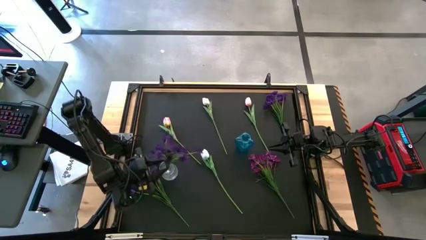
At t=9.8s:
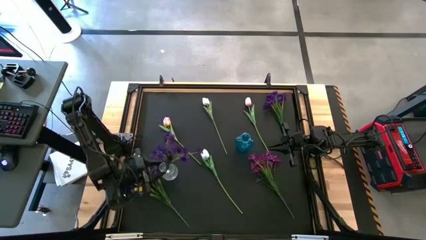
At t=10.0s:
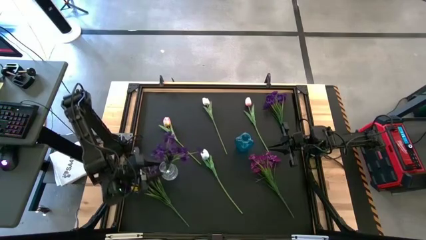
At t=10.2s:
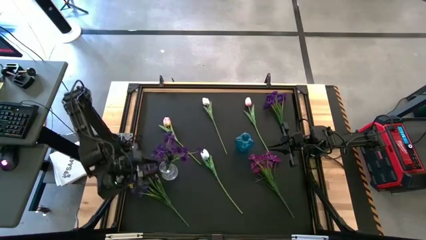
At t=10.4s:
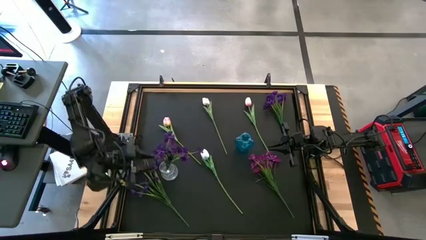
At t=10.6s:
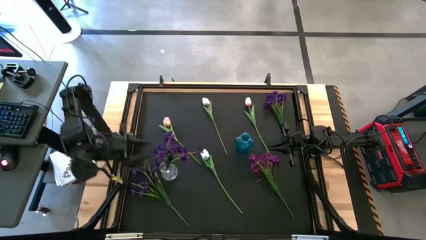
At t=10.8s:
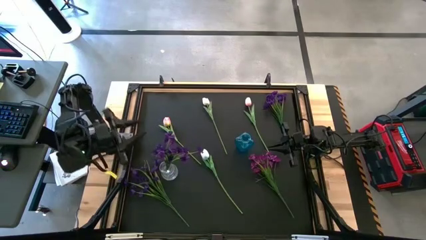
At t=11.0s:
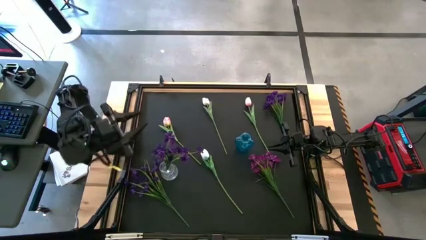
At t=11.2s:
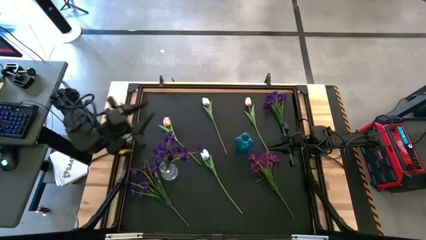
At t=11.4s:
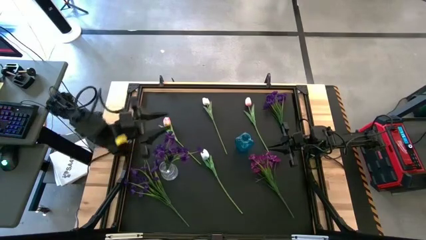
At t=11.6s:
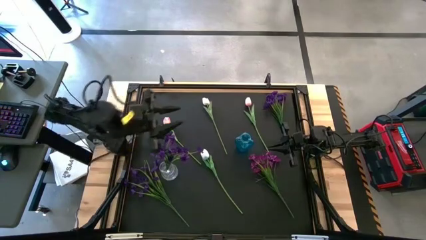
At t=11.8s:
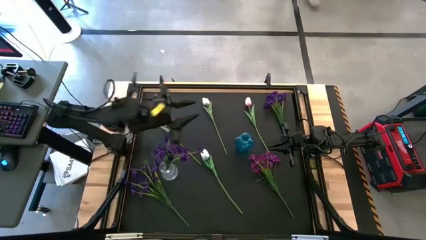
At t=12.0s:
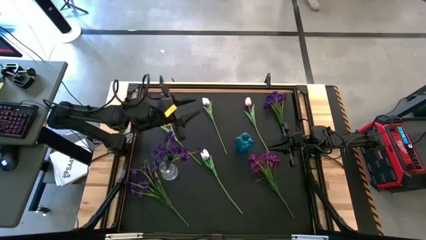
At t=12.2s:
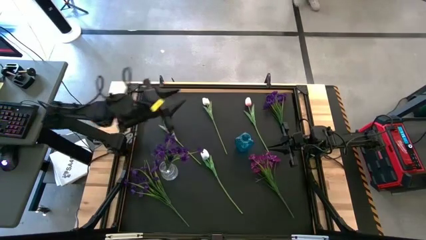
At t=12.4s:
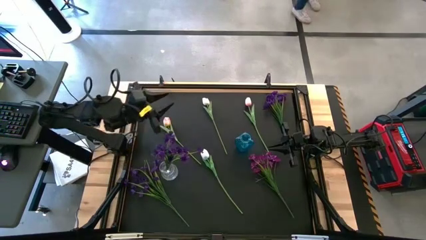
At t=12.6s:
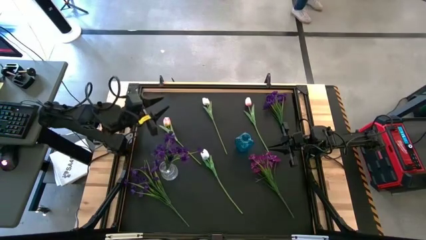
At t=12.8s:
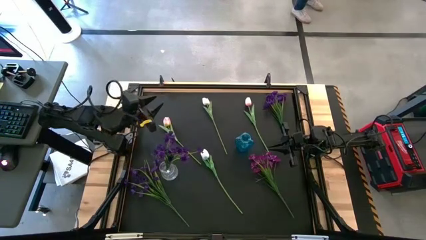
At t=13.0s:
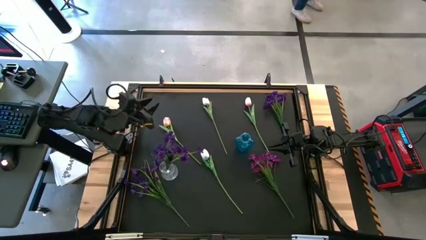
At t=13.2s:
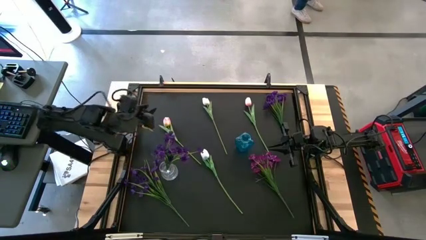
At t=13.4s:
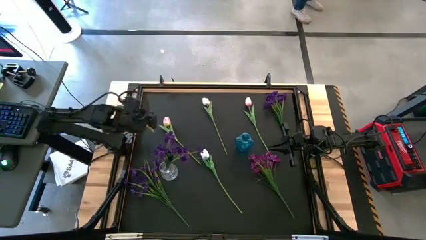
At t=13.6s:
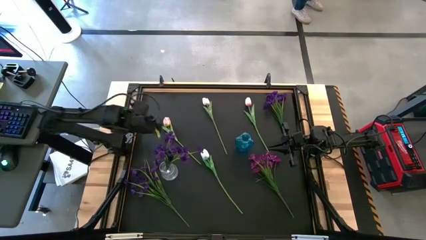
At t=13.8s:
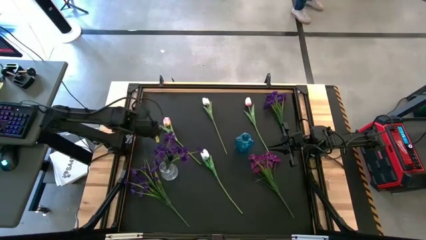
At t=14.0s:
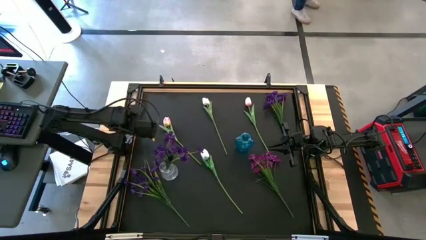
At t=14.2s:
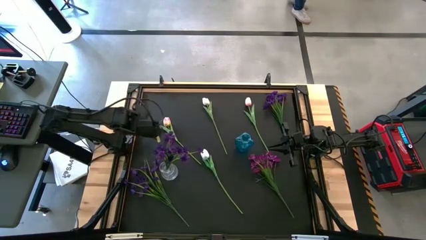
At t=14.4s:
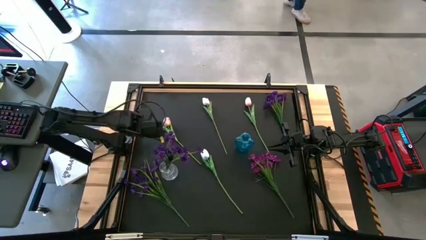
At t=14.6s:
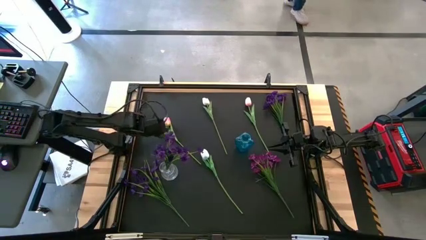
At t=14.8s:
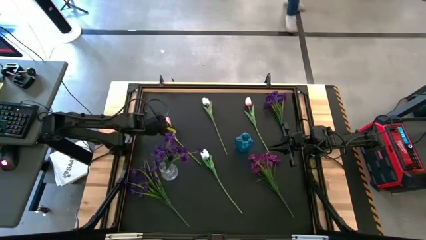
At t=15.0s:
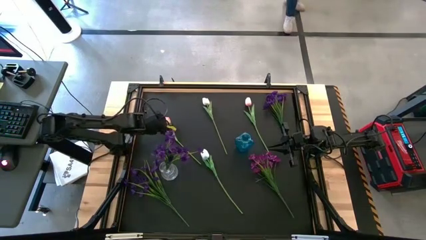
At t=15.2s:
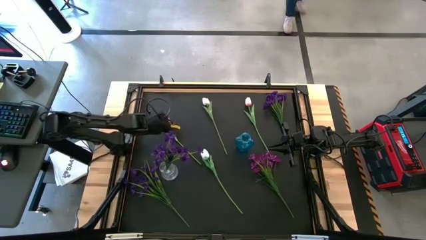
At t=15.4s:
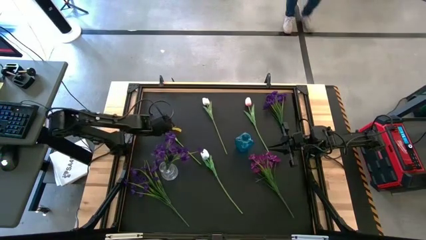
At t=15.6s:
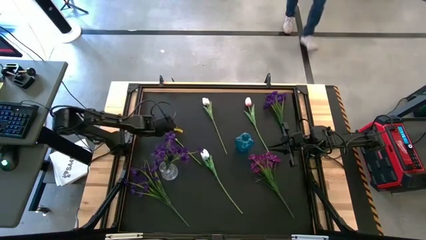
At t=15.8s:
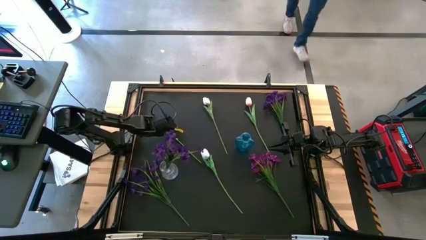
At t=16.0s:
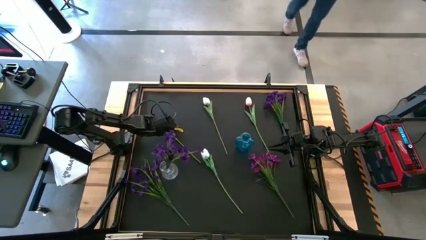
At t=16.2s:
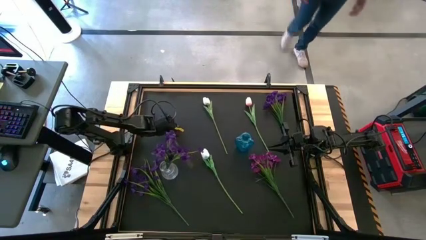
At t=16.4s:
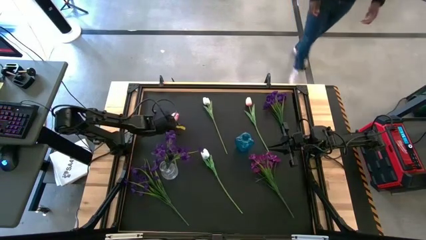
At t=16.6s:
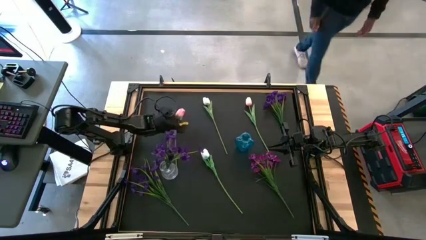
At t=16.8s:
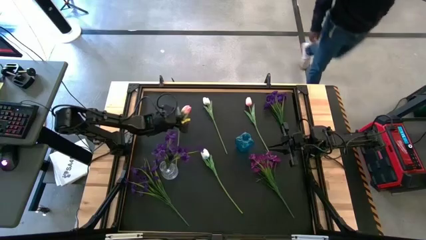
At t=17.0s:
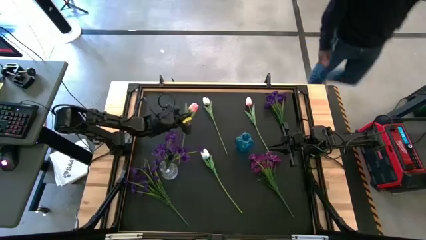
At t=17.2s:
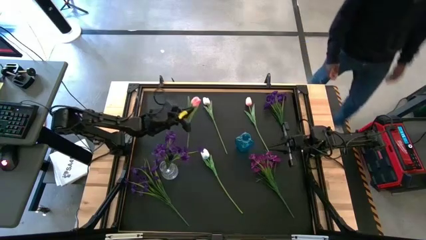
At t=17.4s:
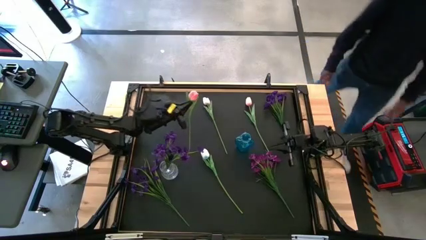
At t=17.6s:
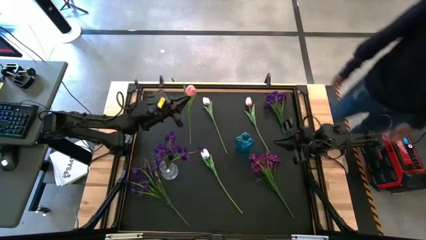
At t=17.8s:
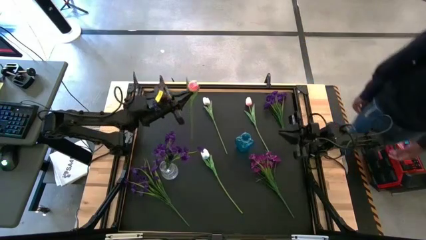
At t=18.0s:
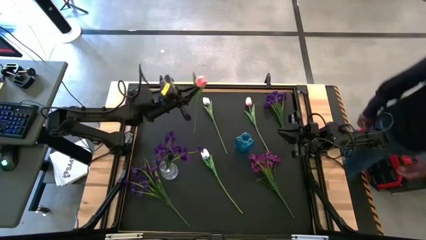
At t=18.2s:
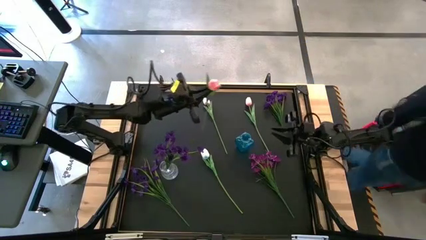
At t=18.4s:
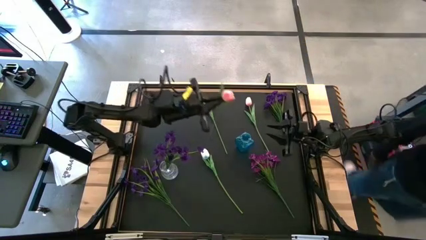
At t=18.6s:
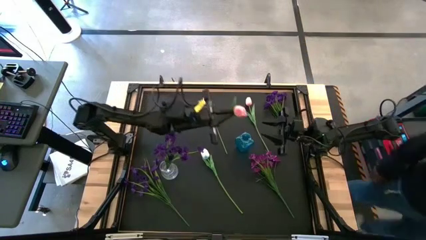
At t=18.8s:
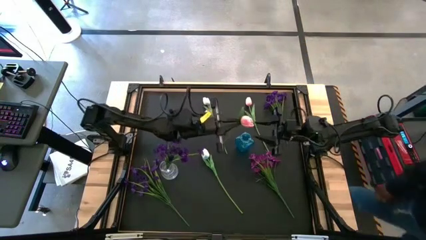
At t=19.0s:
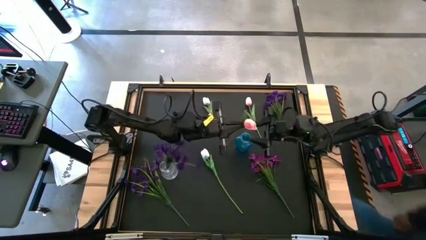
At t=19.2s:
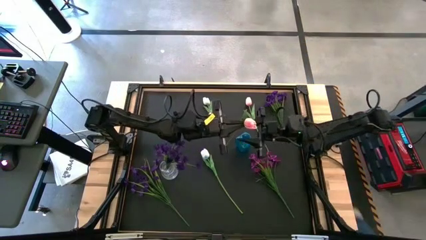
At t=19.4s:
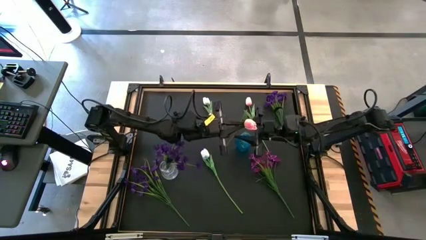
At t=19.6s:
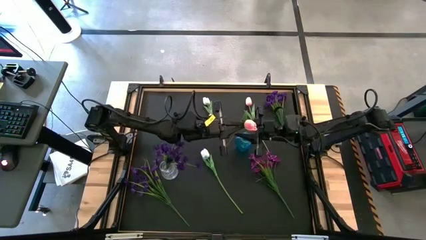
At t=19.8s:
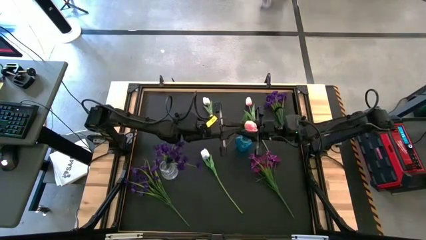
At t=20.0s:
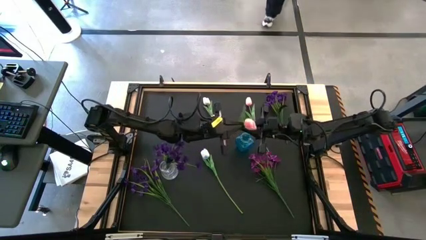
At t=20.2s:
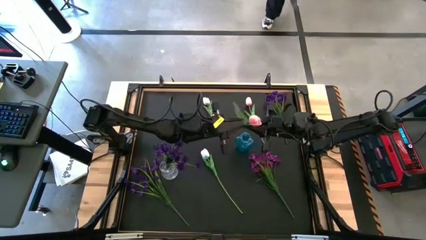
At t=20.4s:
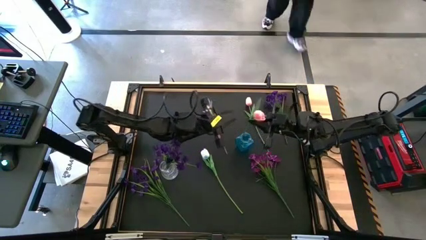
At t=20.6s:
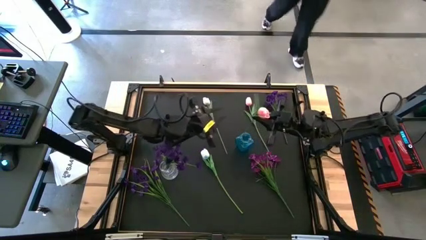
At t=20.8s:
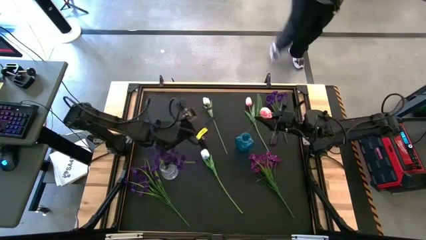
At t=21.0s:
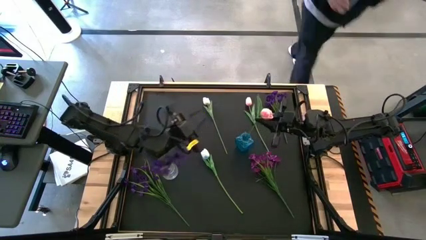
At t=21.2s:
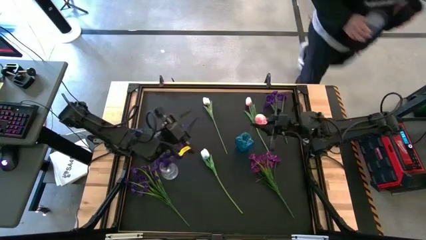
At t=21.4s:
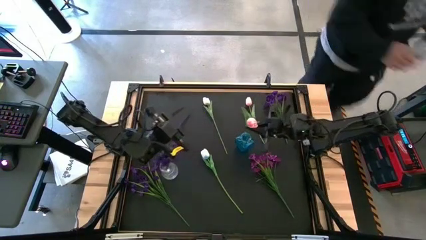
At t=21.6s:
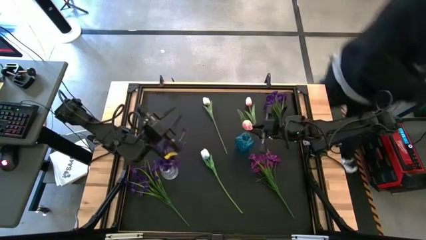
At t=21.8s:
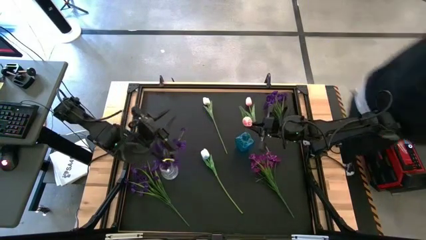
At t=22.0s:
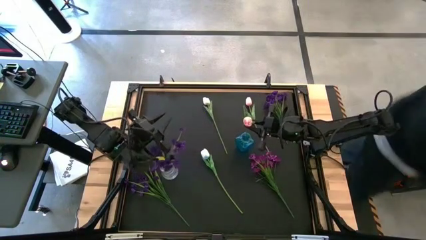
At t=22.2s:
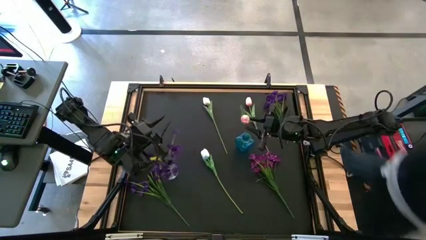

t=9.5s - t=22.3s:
Task: Sort flowers into vase by color
Put the left pink flower into the blue vase

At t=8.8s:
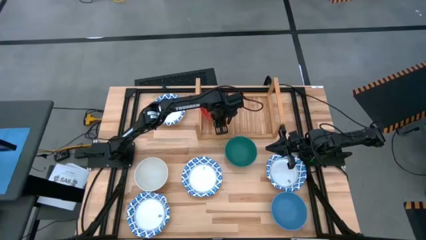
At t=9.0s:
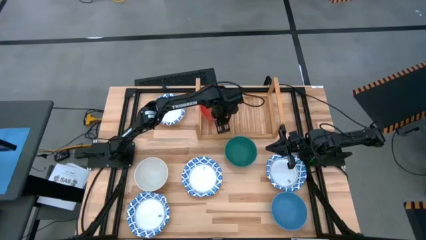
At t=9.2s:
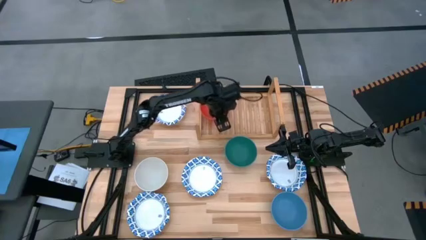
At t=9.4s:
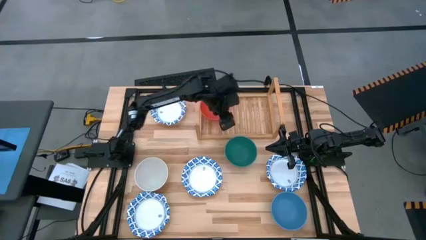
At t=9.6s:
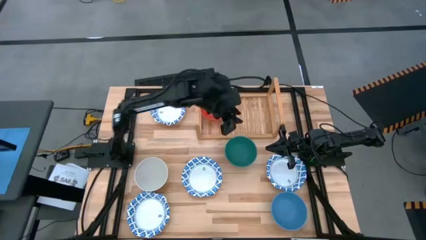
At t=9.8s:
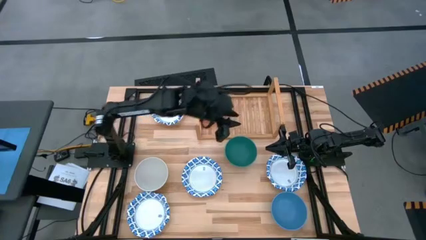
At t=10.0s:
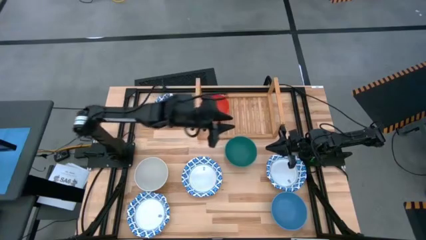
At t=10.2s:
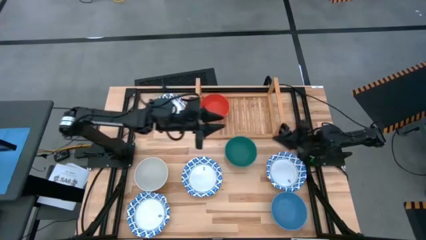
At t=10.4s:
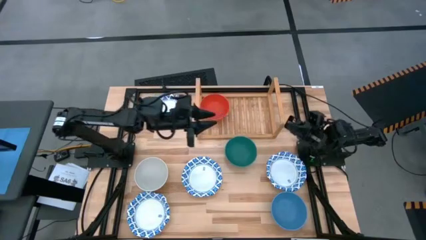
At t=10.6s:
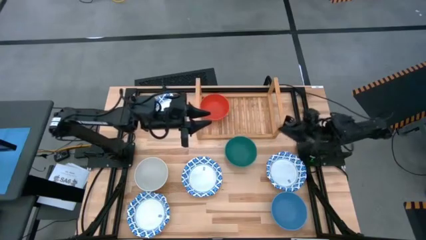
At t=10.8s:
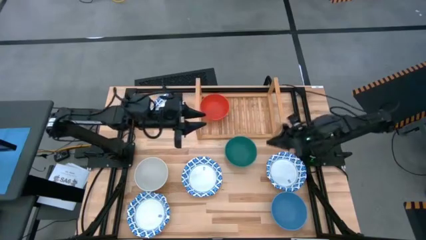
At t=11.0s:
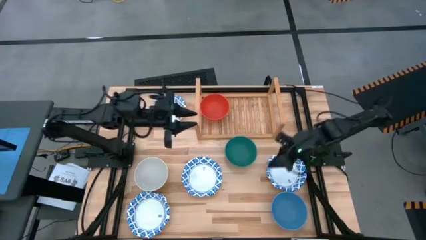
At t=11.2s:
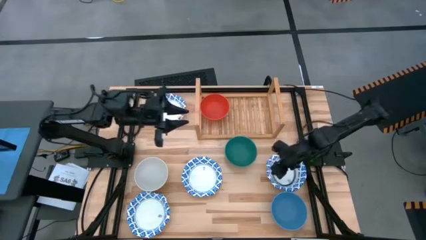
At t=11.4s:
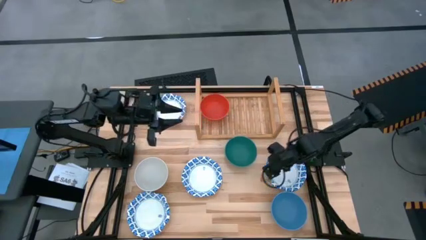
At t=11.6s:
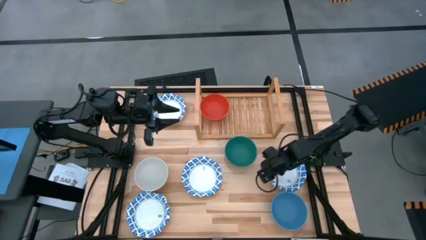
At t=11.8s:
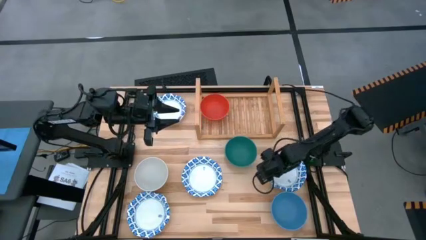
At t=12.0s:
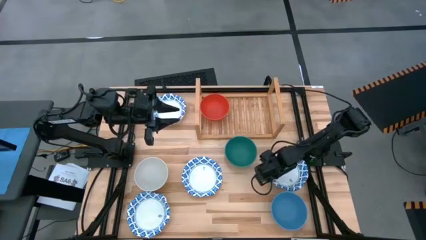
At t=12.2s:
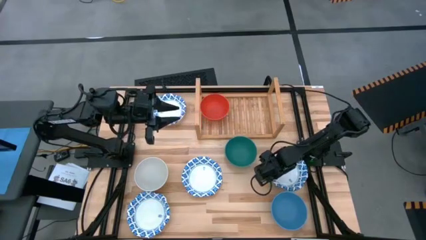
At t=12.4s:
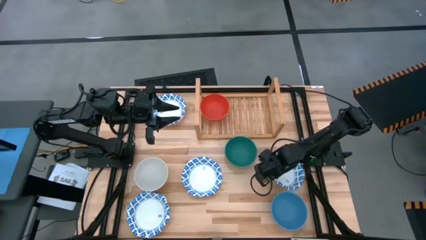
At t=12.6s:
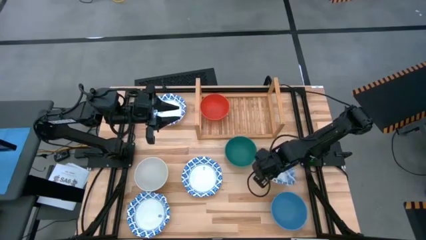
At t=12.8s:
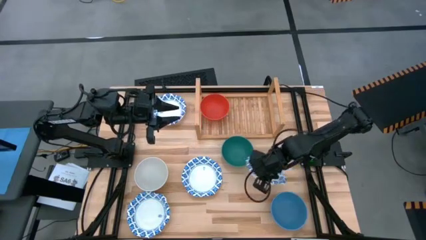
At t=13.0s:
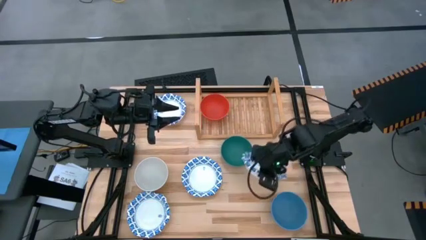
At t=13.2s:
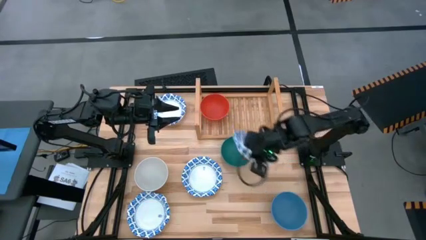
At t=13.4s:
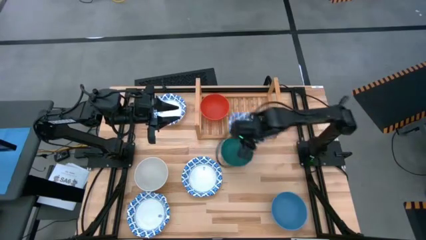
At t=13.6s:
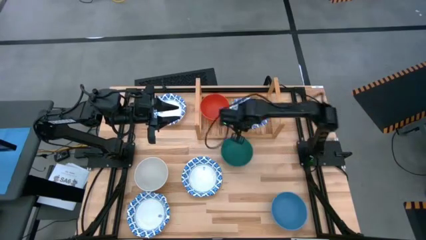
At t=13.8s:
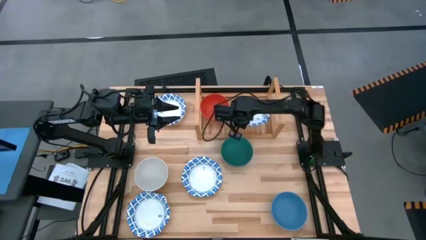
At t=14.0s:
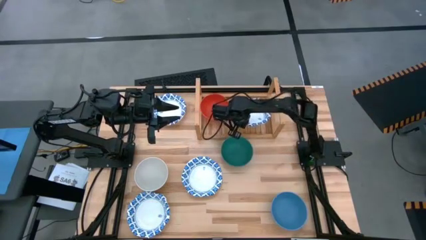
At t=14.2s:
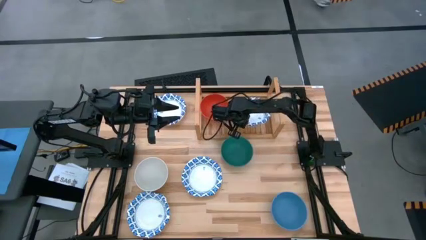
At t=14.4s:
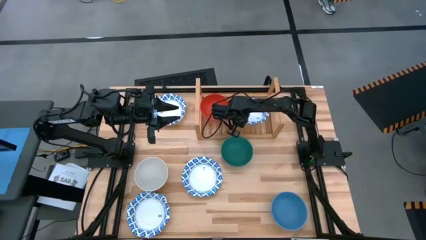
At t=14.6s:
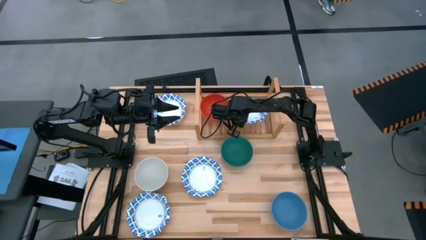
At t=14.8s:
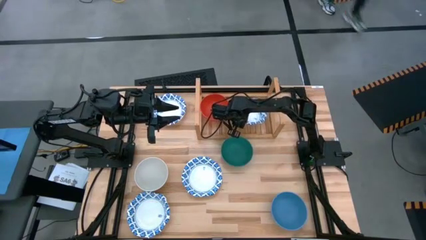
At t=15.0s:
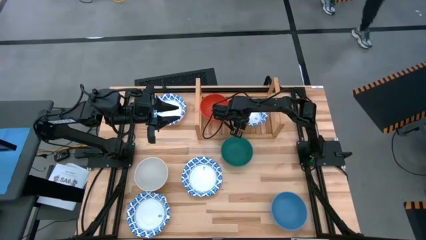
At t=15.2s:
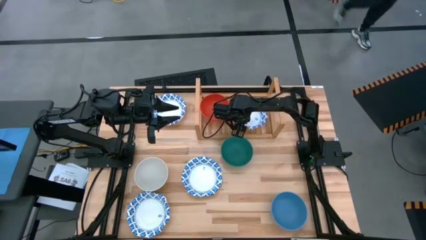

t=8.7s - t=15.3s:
Task: Place and stack bowls onto a shelf
Put the blue patterned bowl on the shelf
